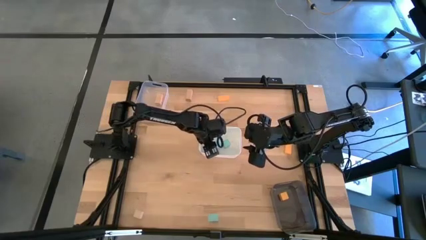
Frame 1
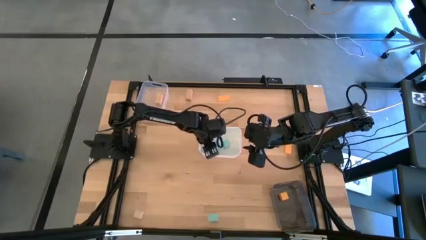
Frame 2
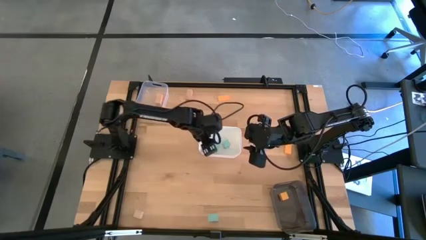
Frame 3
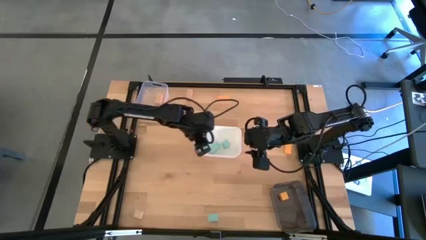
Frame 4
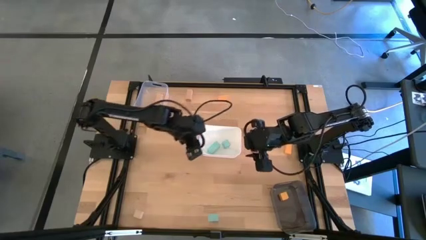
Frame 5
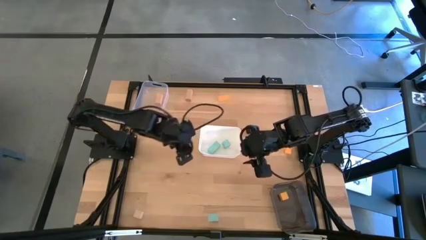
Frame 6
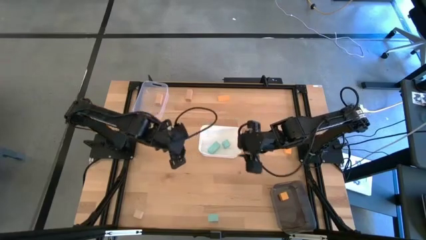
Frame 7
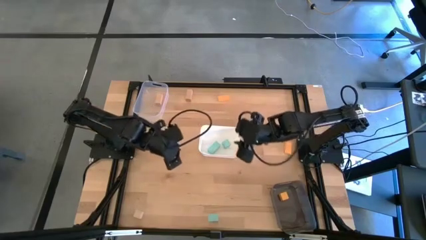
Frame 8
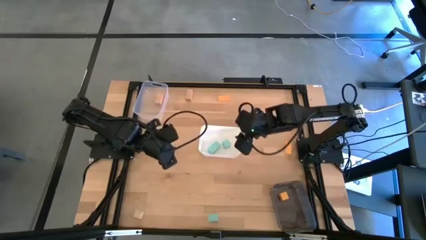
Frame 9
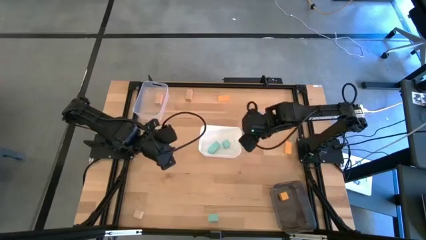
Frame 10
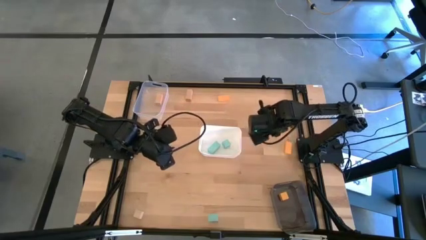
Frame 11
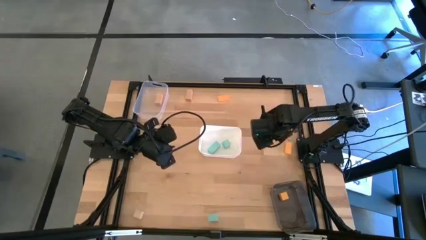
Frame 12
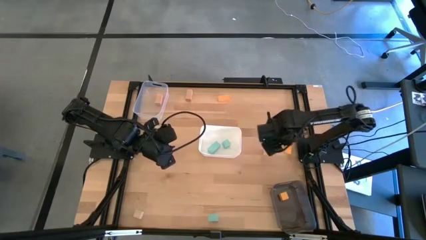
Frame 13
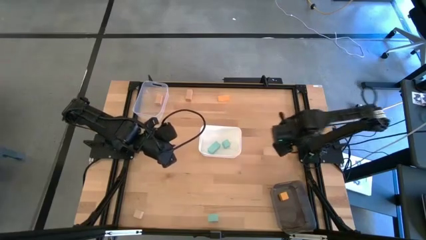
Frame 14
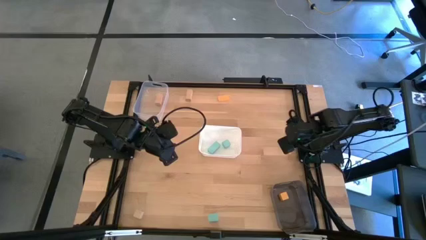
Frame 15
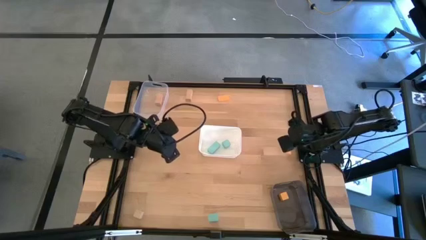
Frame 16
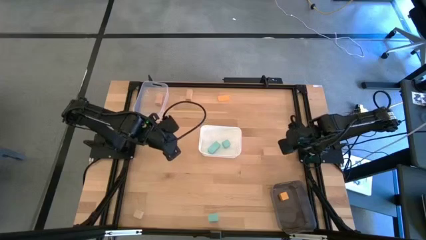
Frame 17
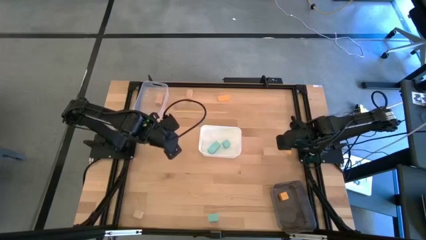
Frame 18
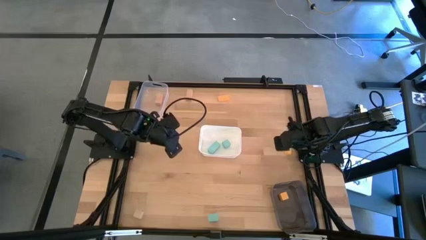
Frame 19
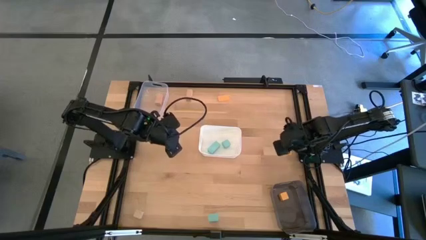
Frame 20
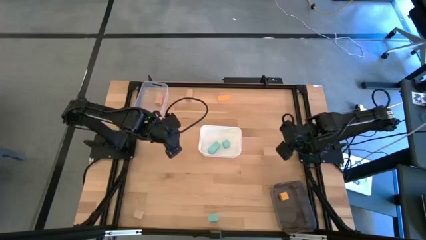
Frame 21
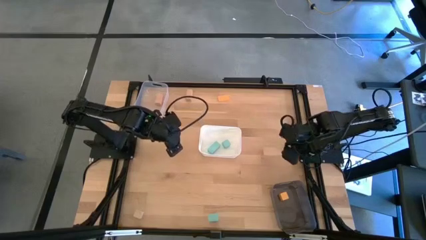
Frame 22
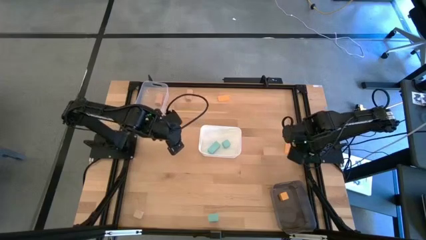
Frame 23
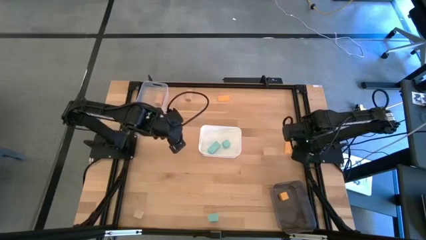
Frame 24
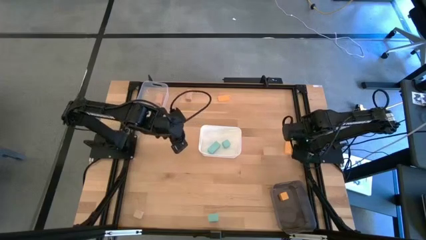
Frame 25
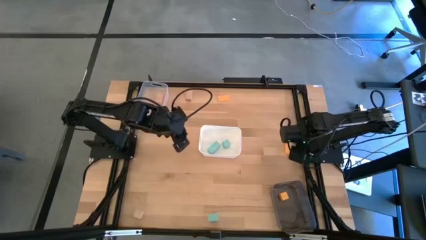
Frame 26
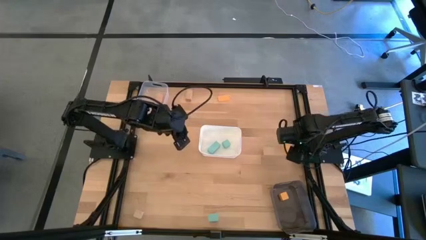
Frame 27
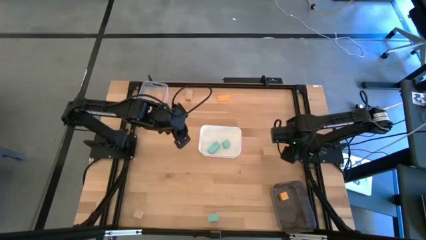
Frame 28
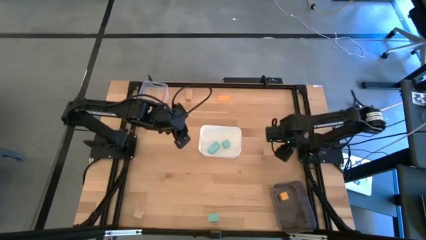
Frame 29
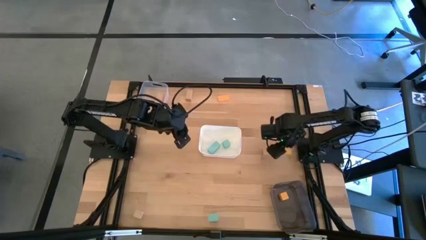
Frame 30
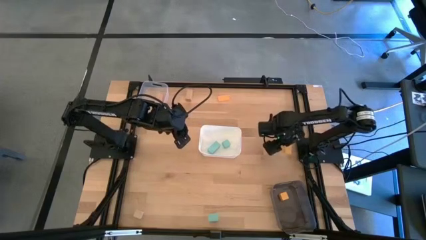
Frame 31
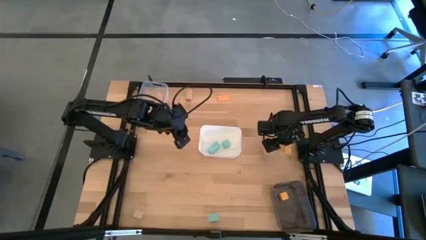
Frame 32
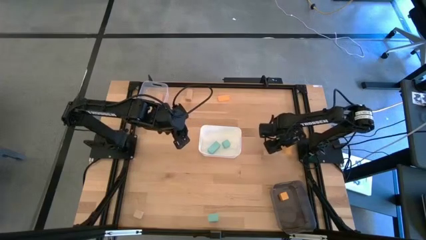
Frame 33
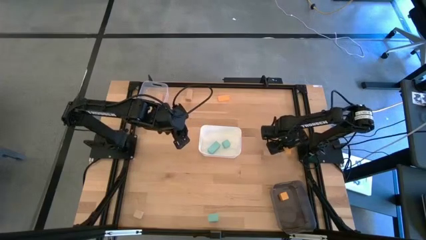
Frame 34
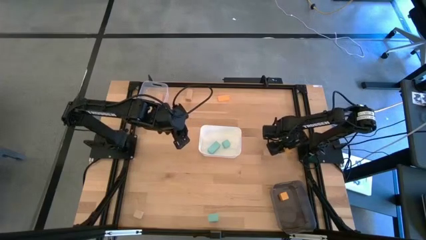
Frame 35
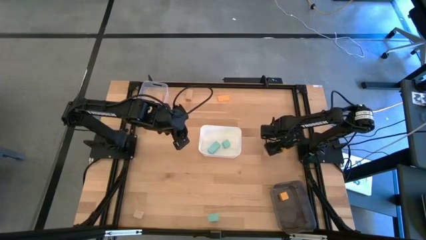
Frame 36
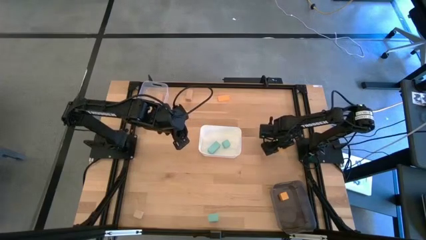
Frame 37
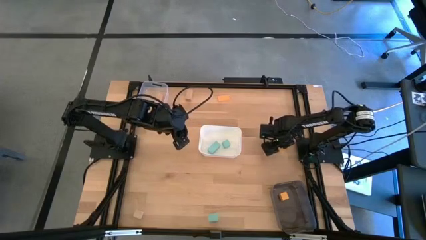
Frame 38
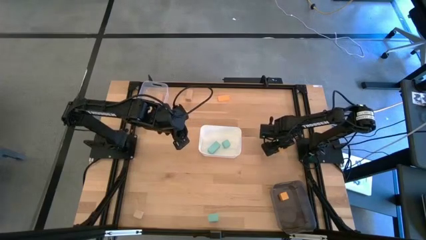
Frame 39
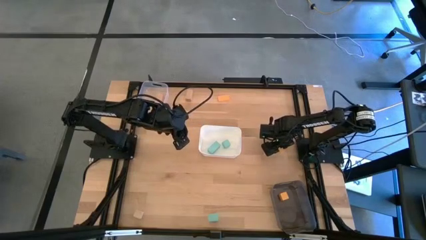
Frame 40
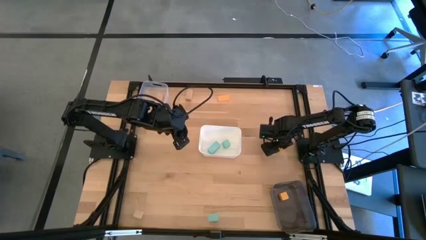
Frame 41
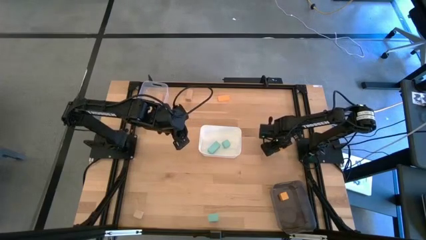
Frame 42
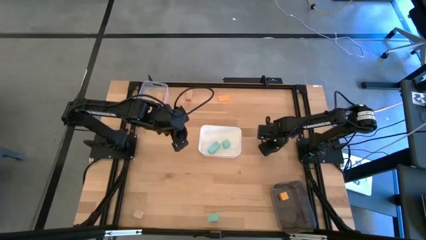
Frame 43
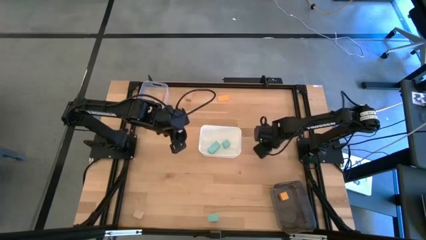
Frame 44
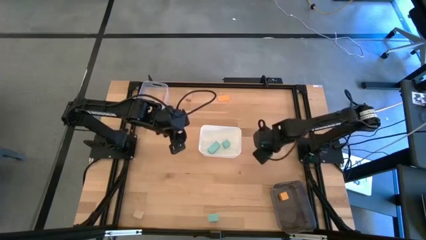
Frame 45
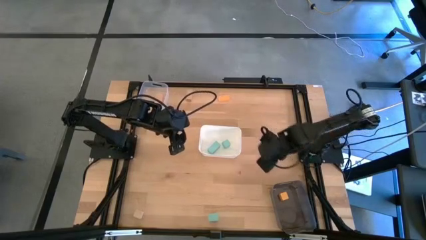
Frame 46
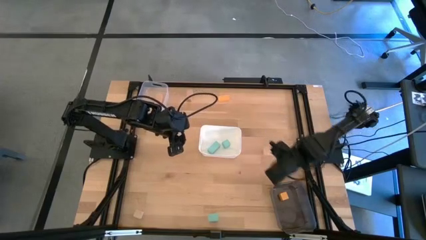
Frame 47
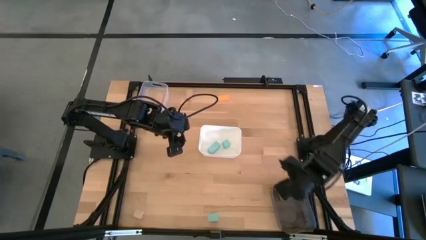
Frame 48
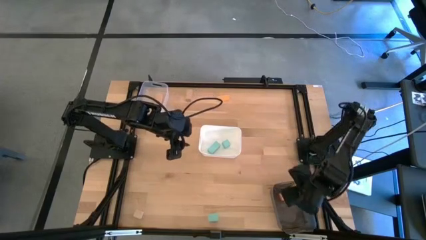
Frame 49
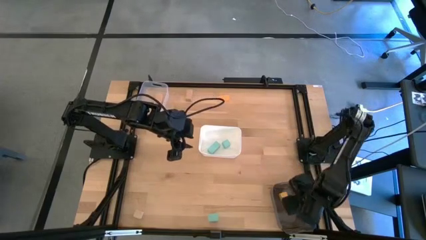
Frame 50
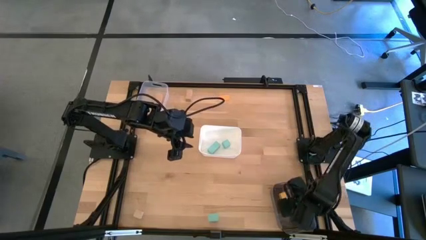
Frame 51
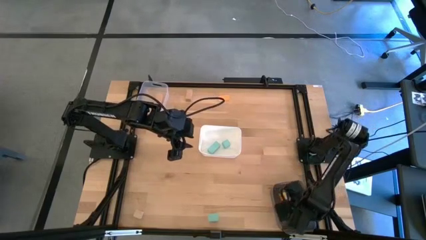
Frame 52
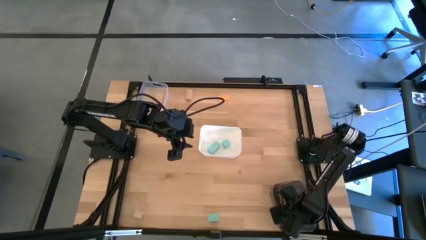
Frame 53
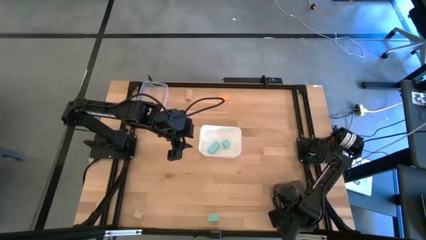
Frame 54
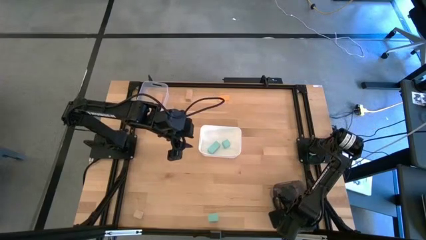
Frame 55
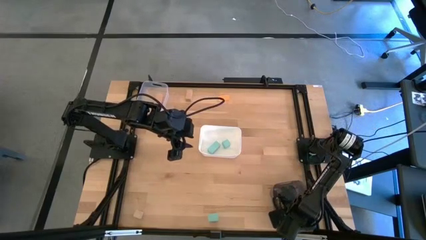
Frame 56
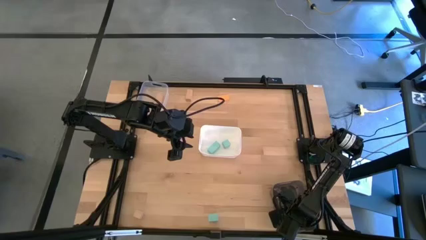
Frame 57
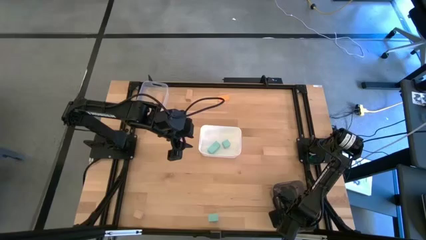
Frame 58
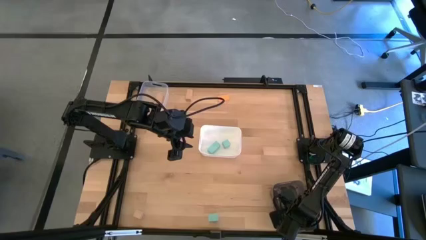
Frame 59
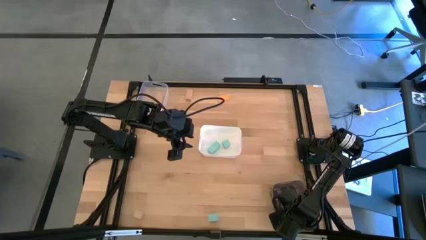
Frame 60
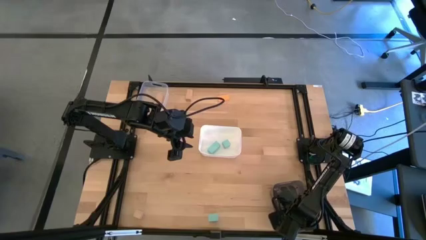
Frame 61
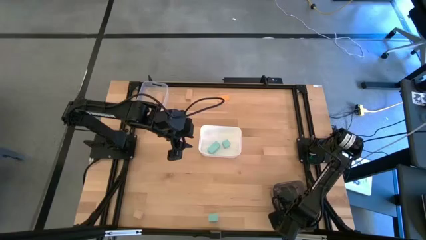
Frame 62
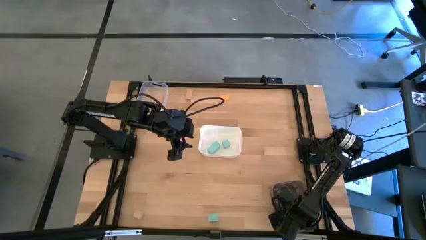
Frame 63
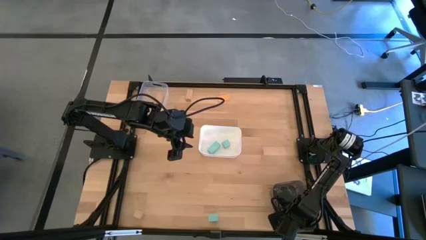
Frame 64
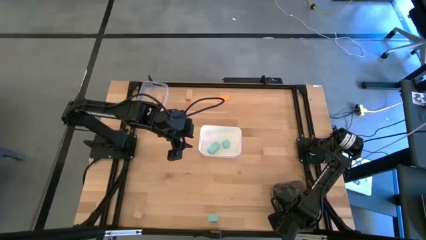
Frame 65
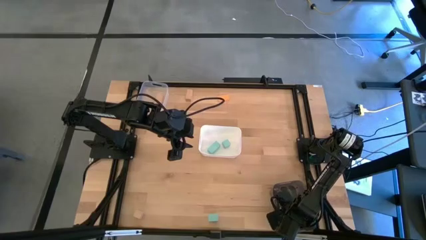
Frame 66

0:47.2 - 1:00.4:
Task: Sort & place blocks by color
Put the bottom yellow block into the black bin

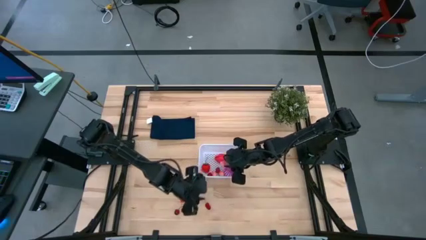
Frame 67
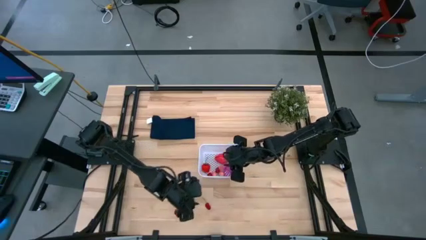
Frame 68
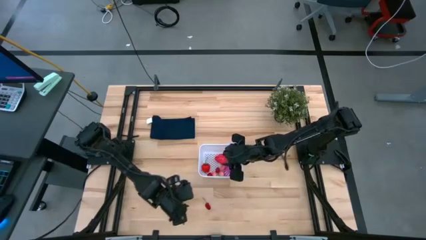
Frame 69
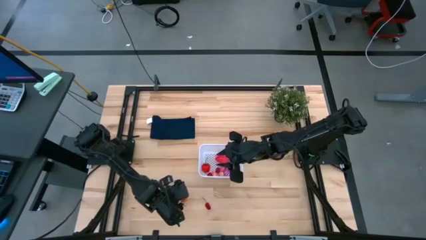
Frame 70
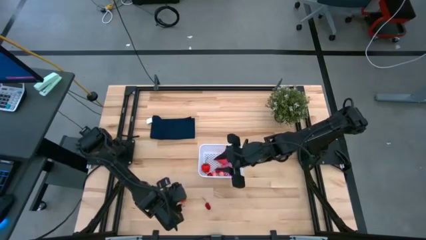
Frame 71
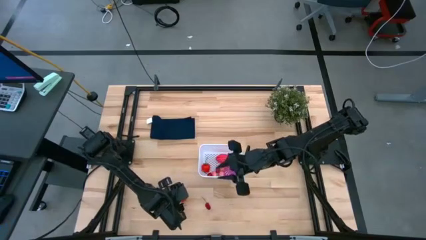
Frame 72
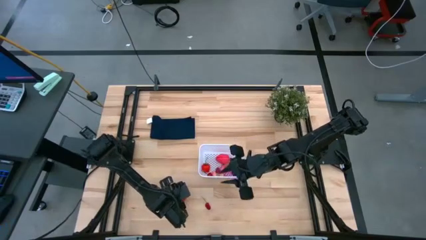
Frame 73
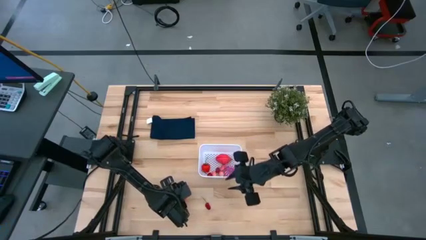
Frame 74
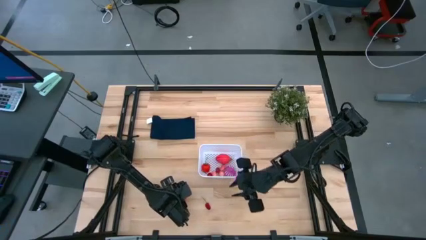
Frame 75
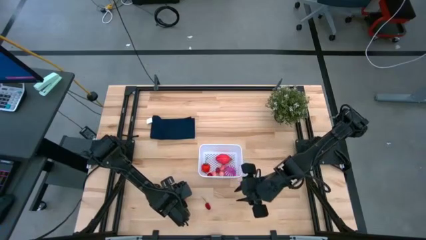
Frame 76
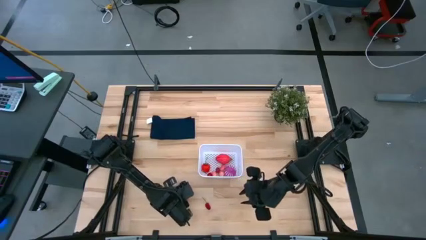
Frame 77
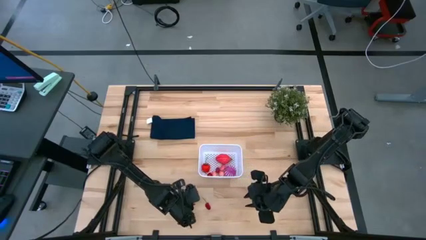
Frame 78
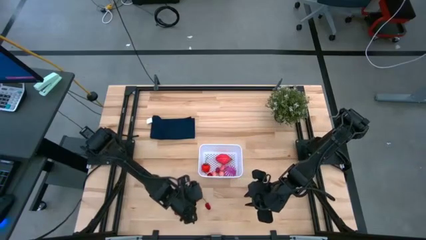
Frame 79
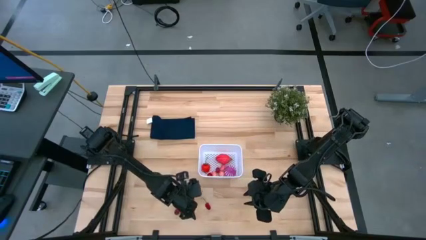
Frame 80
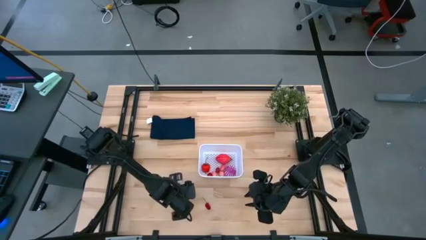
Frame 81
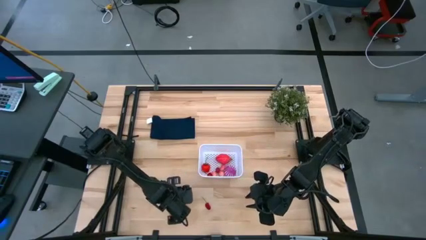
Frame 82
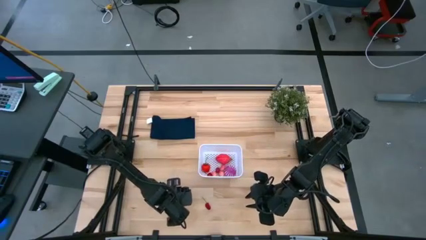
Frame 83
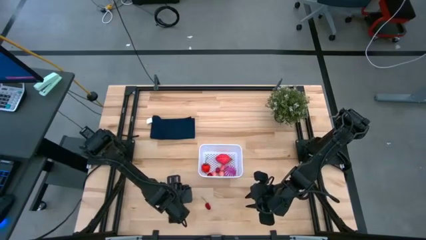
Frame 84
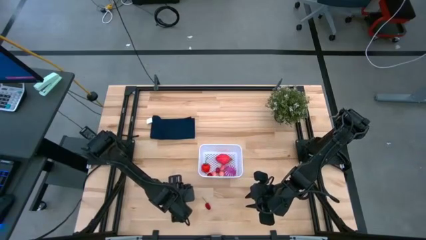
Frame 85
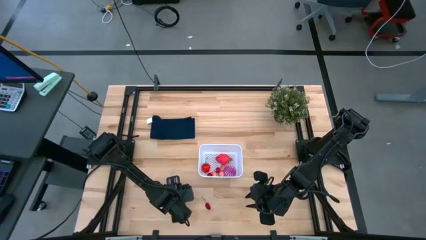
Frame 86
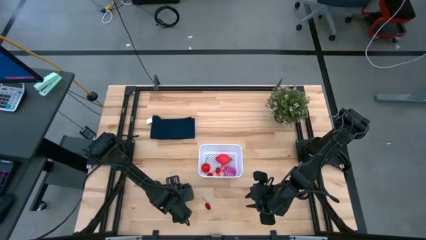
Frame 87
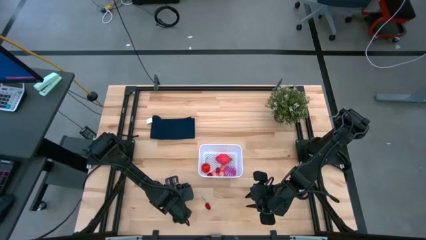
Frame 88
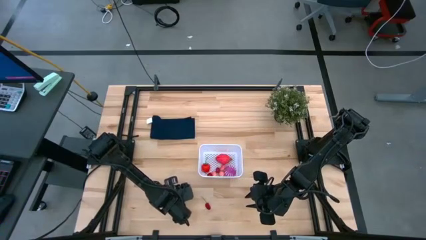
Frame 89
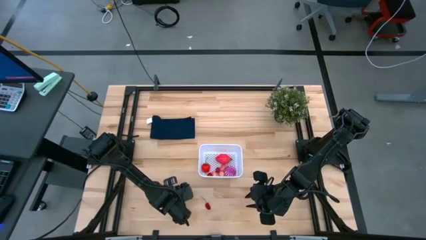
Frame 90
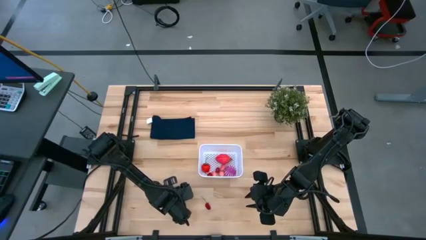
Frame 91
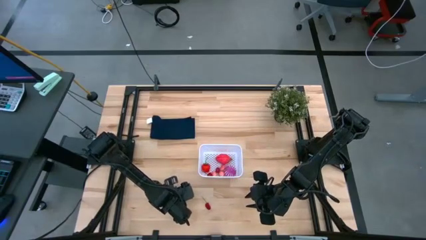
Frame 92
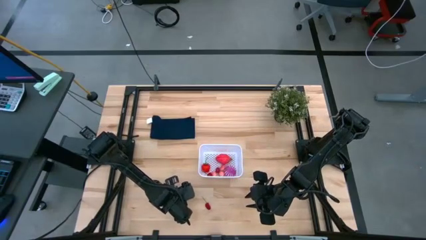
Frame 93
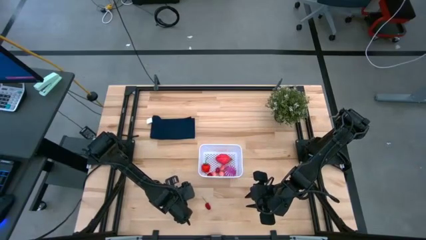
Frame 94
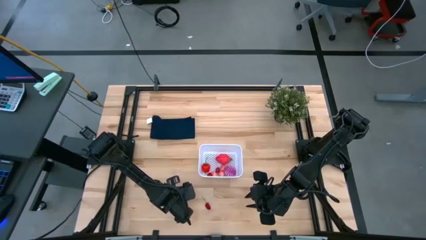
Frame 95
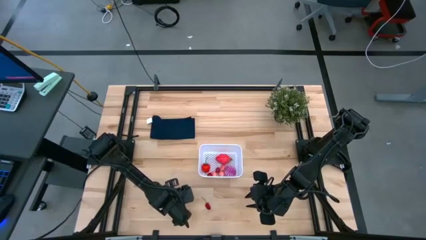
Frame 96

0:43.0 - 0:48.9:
Task: Pick and placing Produce into tupperware
Put the raspberry into the white bin
